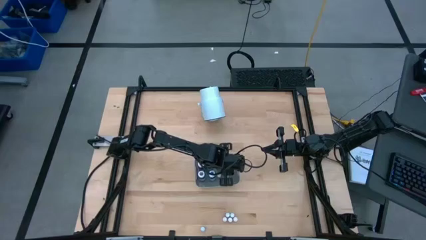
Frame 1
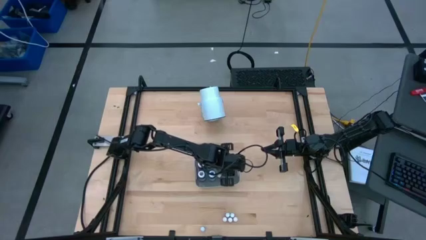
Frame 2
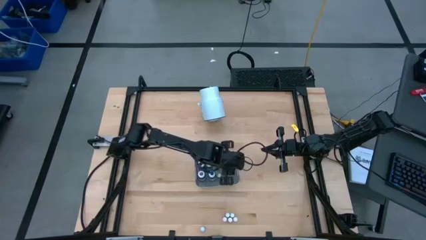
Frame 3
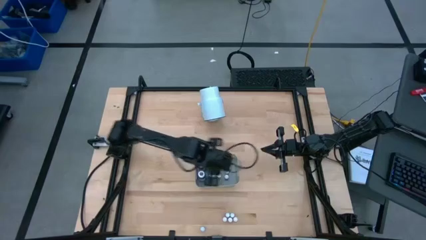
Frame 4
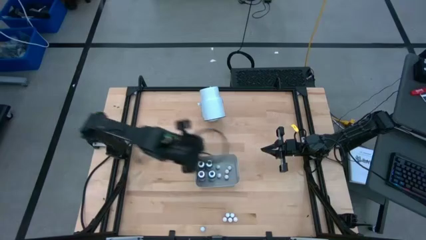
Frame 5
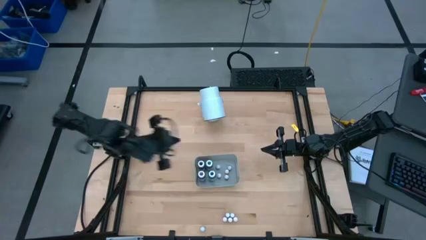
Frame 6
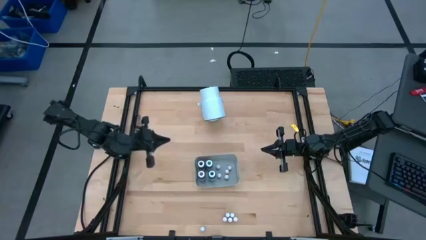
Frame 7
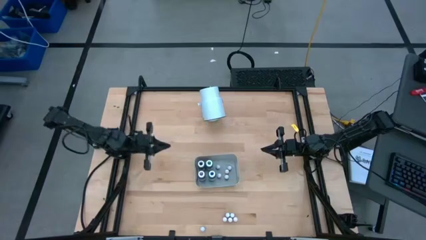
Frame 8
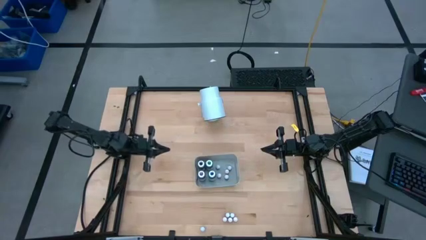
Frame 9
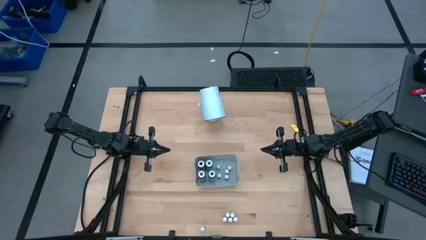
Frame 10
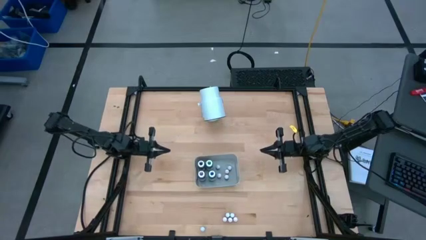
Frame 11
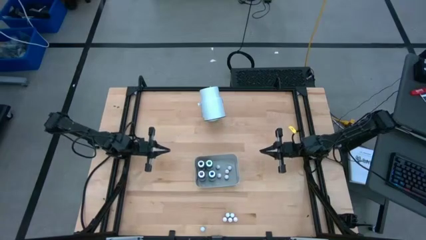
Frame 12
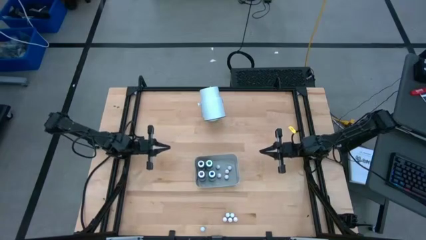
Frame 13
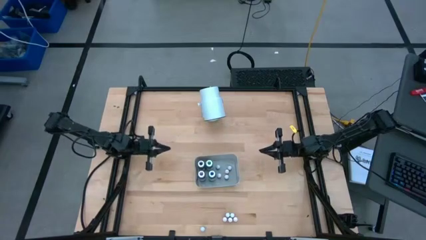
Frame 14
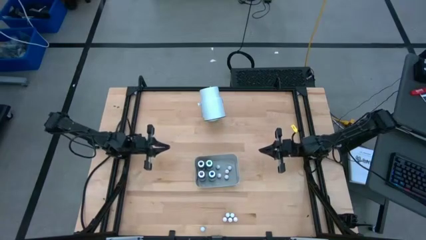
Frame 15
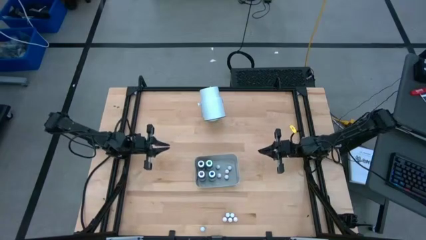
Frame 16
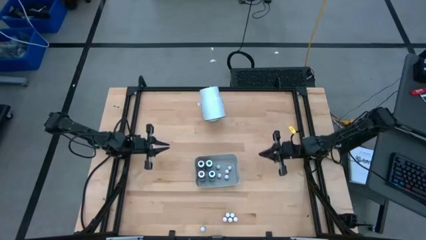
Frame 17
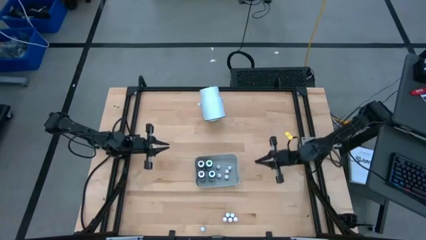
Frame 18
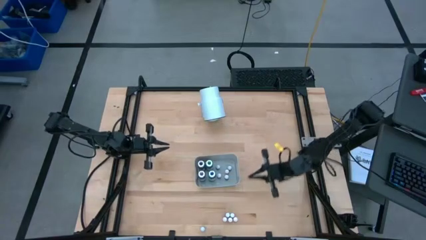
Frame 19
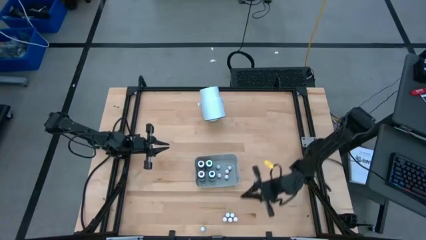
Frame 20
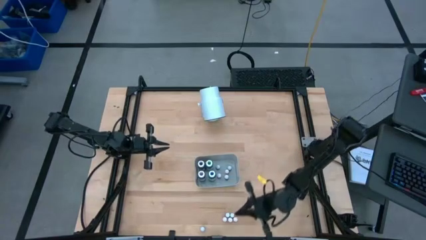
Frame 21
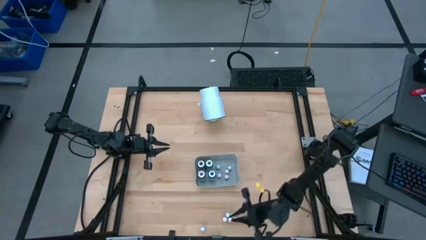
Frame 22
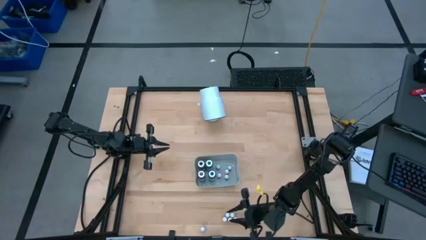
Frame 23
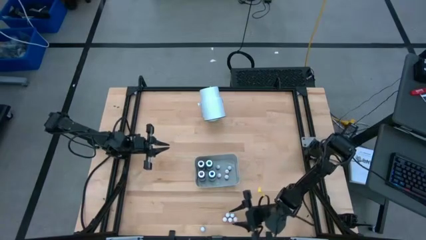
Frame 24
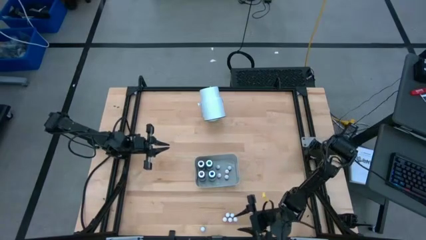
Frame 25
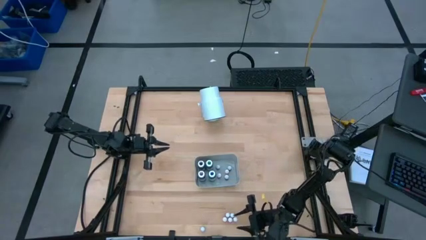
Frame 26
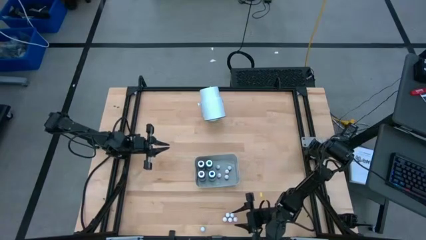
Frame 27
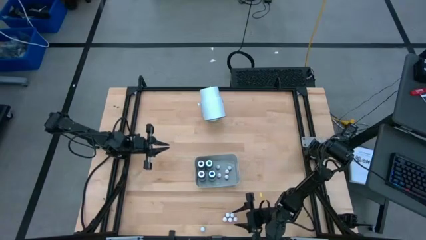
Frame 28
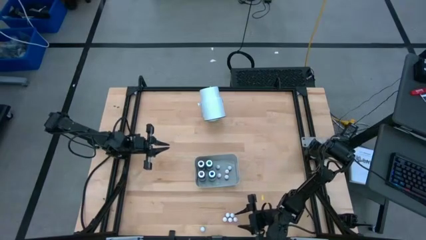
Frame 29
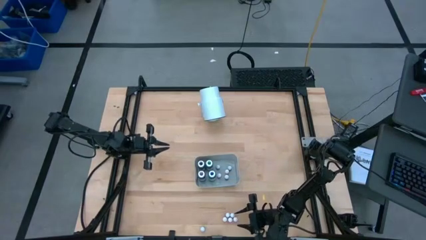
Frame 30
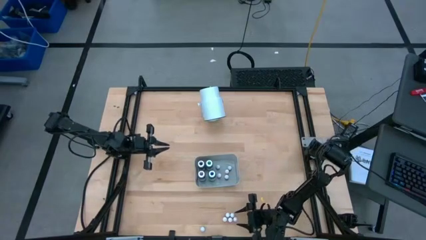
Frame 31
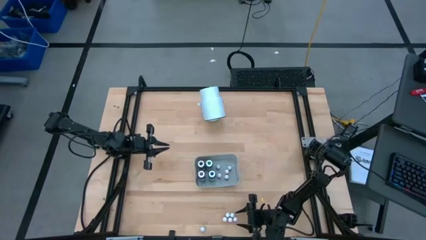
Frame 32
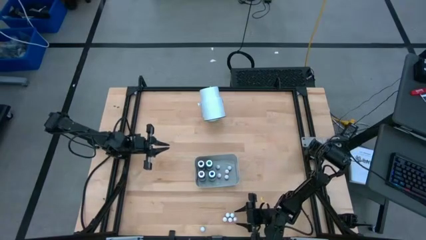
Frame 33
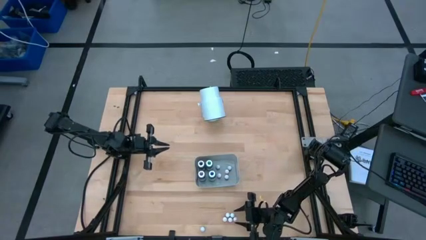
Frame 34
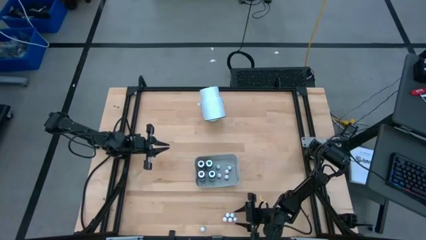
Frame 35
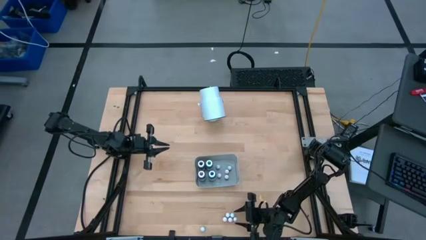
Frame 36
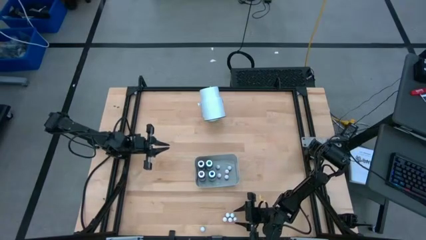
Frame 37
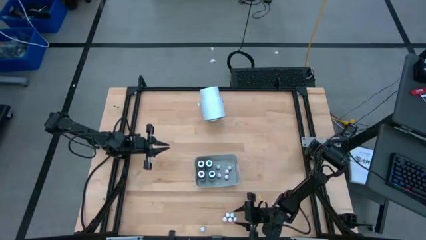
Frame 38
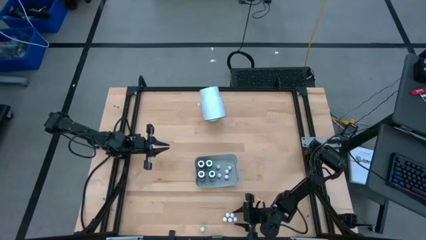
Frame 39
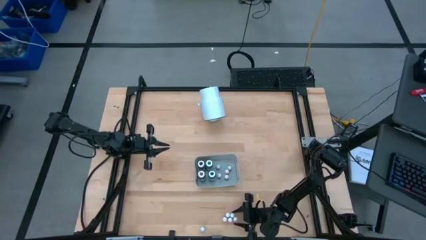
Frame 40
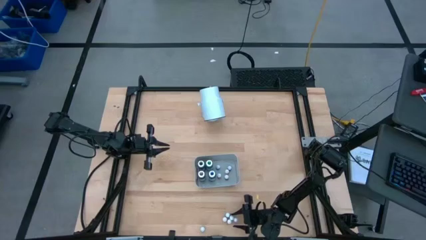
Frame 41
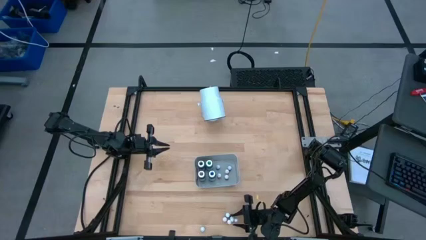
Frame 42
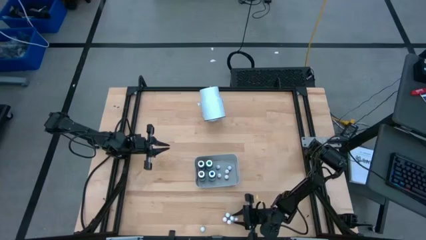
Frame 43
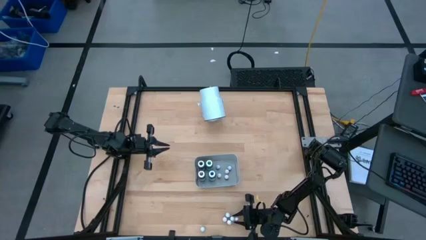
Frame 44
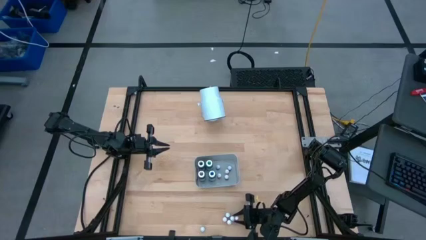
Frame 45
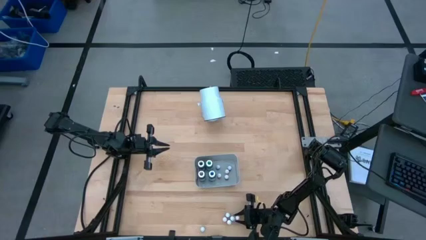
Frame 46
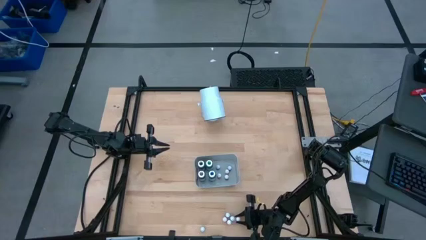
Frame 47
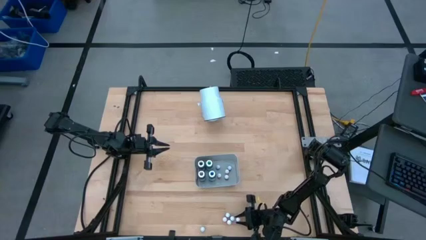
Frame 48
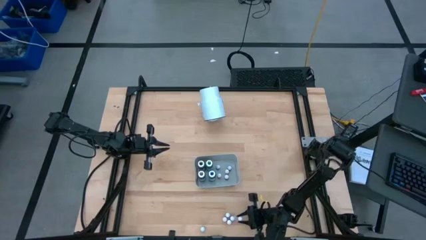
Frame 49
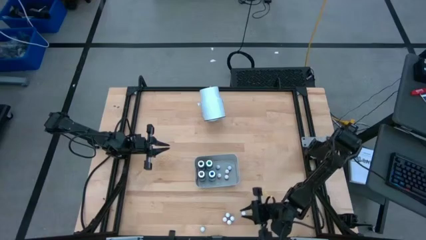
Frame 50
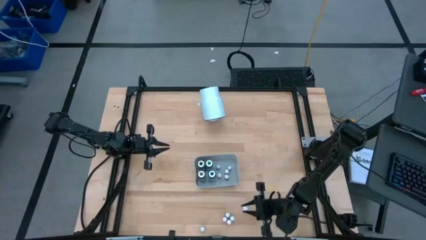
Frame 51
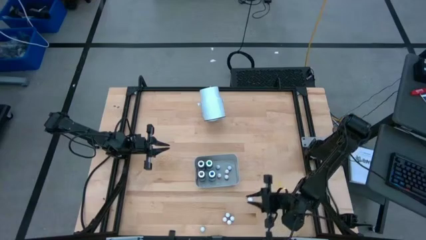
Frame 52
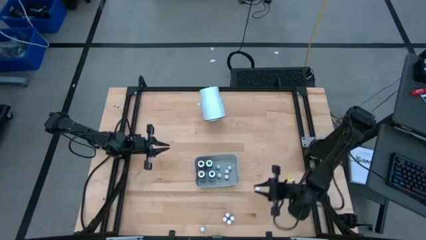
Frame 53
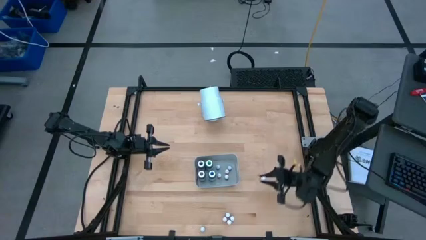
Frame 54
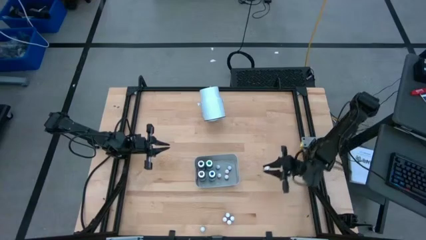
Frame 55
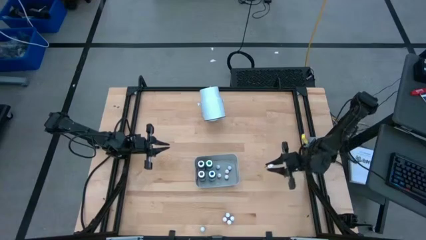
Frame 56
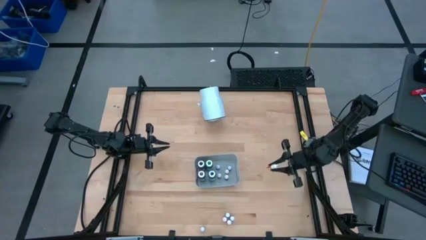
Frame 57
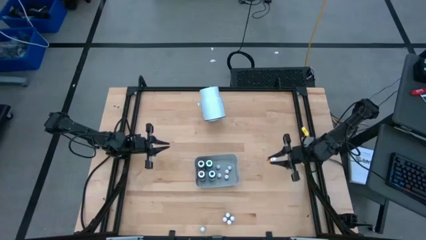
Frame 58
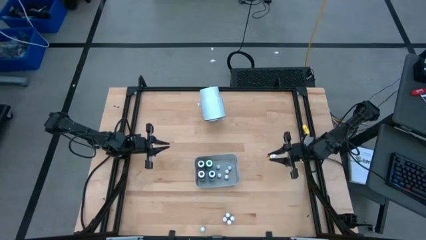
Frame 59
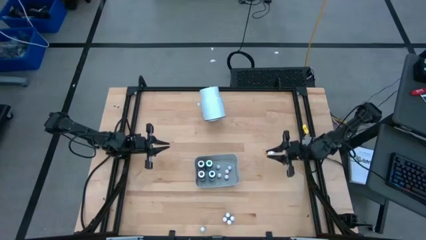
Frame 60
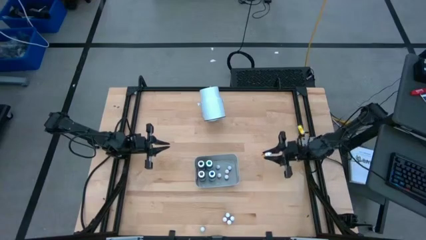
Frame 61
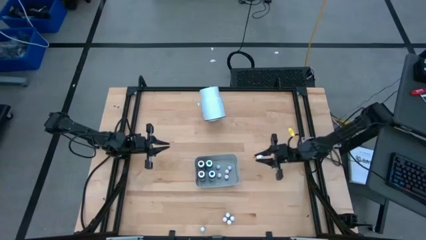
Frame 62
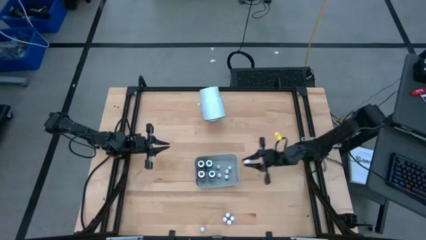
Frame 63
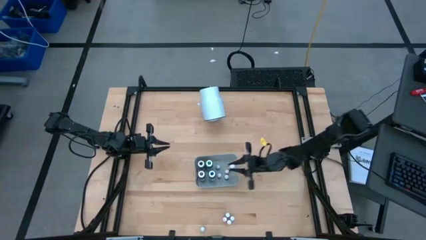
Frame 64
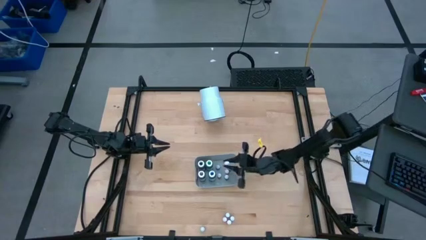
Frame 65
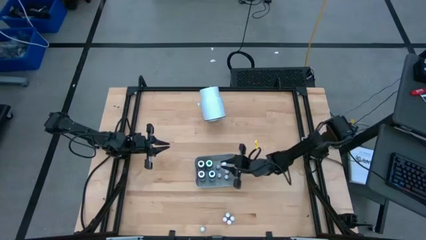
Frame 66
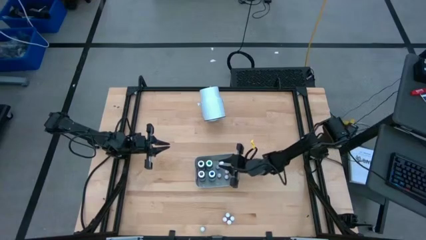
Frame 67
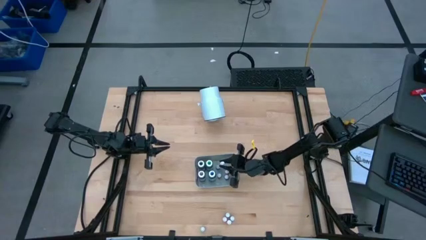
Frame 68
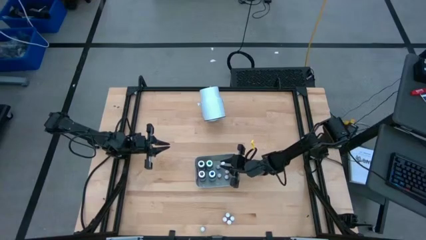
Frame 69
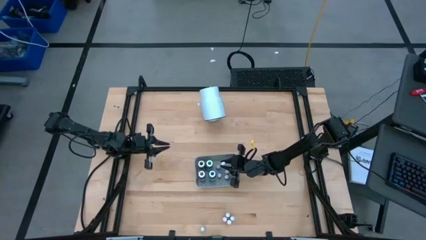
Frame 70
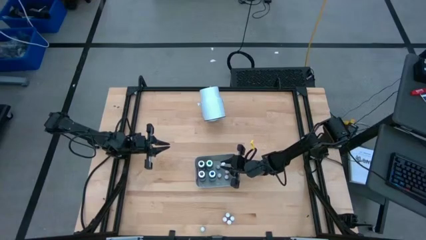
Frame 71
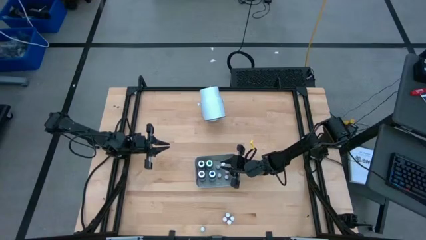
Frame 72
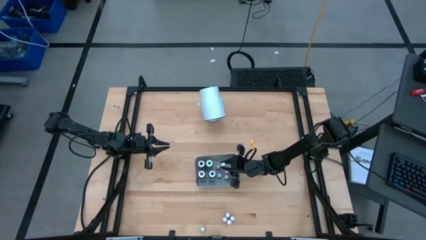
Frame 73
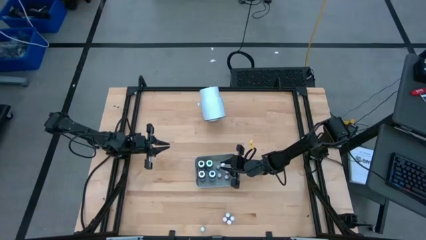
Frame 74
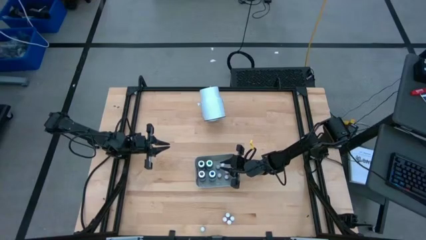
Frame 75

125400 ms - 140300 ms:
Task: Pick & Place food coloring
Put the small yellow food coloring into the gray bin

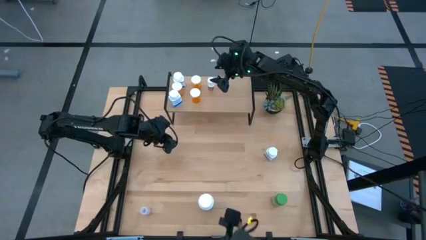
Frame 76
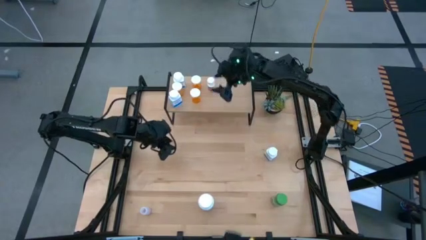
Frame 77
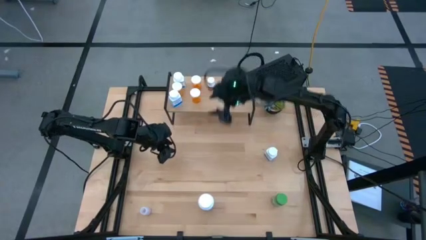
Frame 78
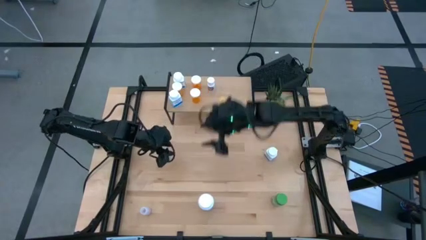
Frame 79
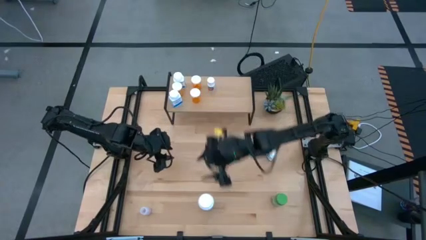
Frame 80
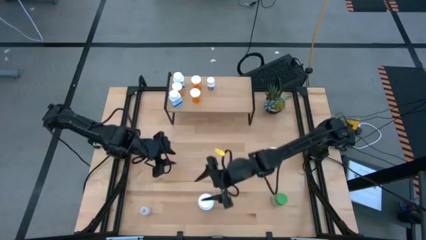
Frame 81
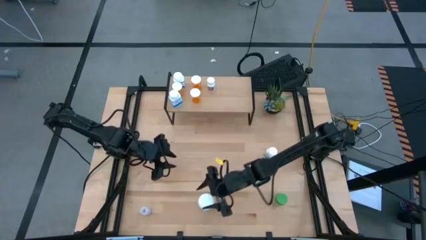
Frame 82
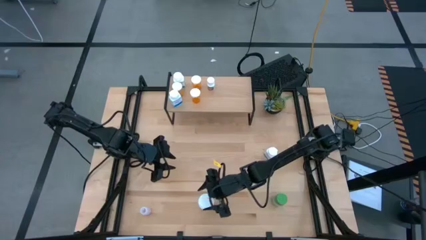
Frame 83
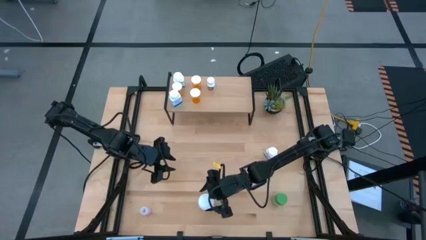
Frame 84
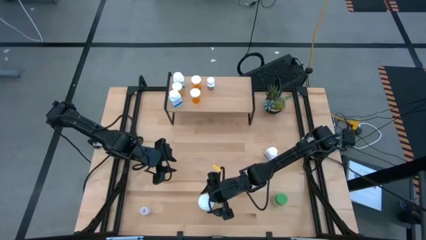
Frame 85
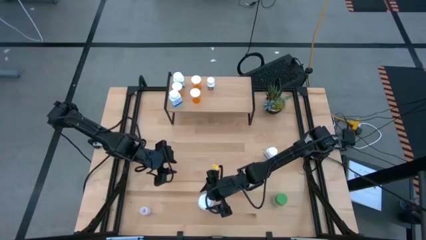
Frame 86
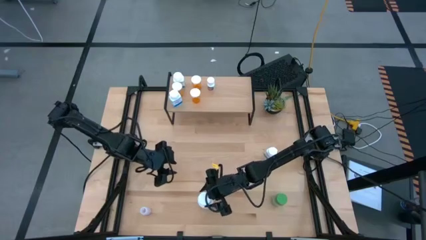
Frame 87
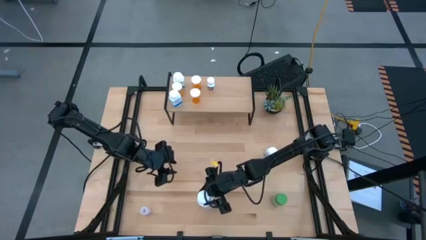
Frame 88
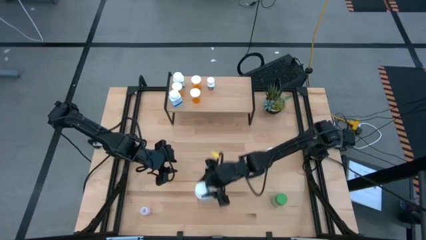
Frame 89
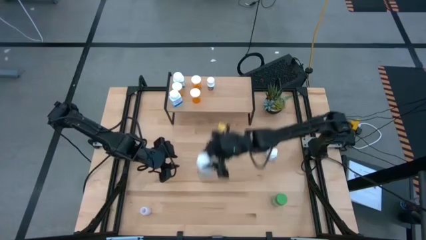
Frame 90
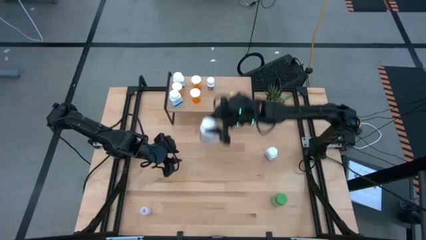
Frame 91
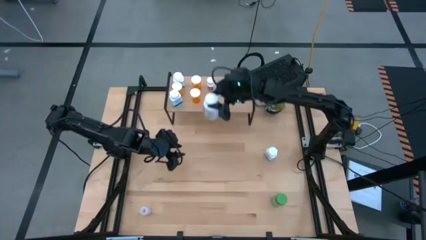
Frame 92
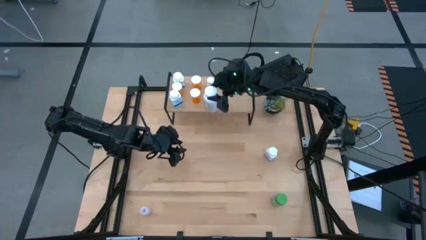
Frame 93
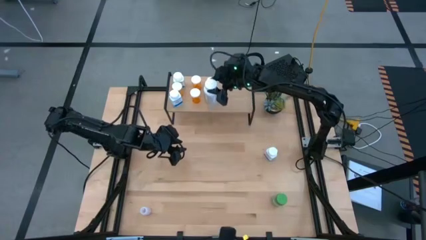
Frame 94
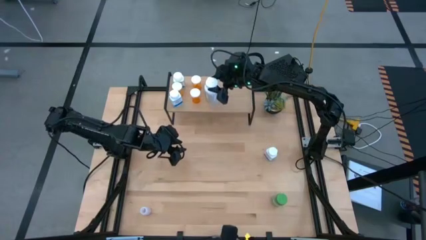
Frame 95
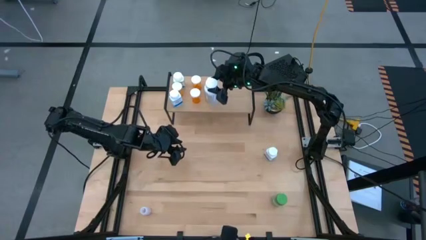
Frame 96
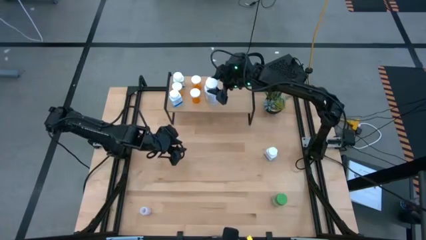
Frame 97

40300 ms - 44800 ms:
Task: Pick and place medicine bottles onto shelf by color
Put the purple and white pill bottle on the shelf
